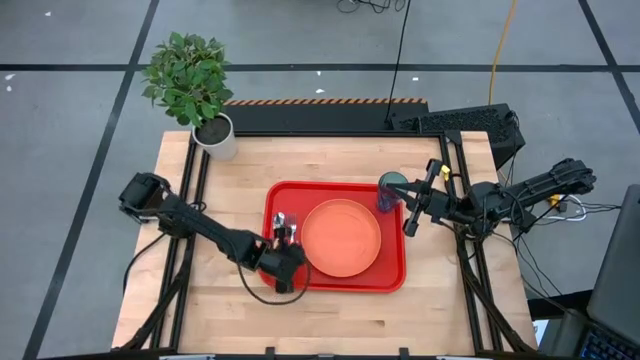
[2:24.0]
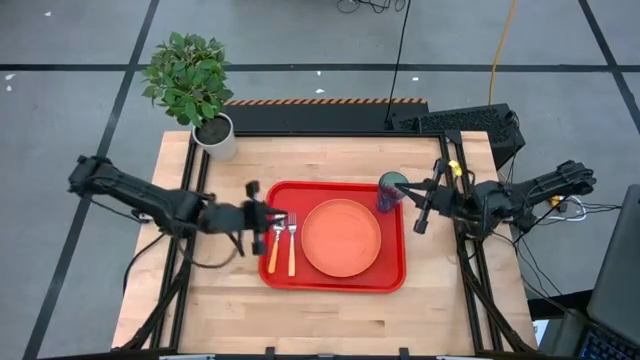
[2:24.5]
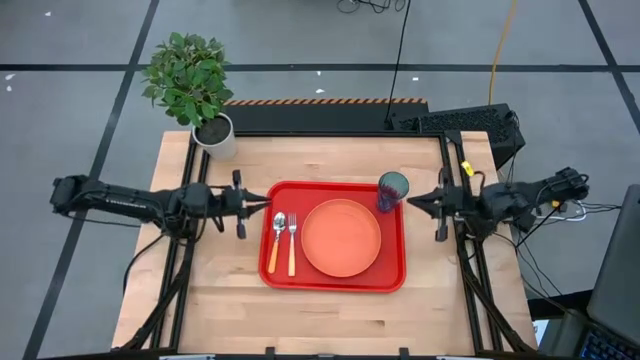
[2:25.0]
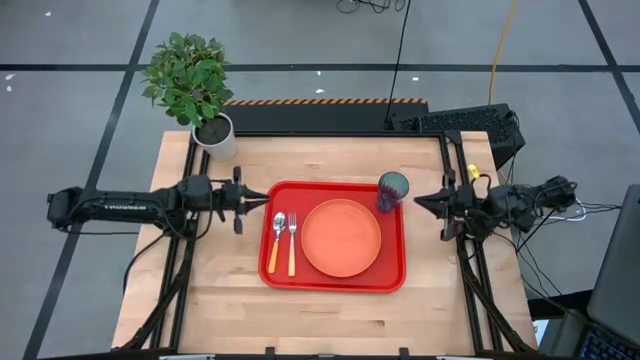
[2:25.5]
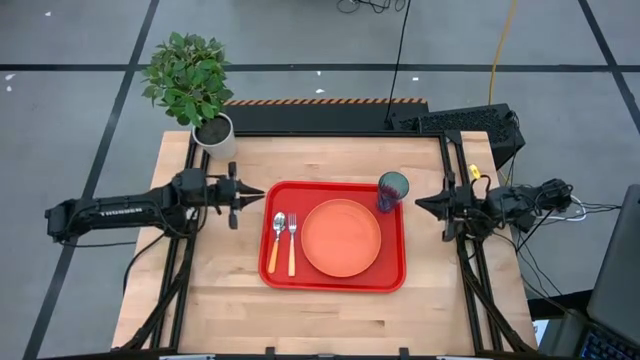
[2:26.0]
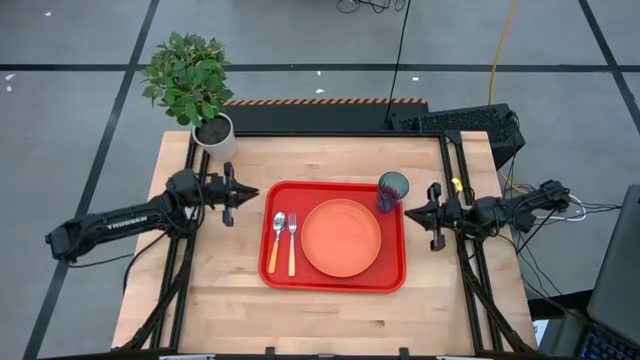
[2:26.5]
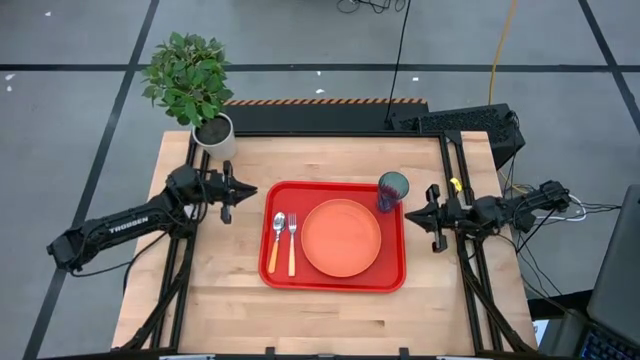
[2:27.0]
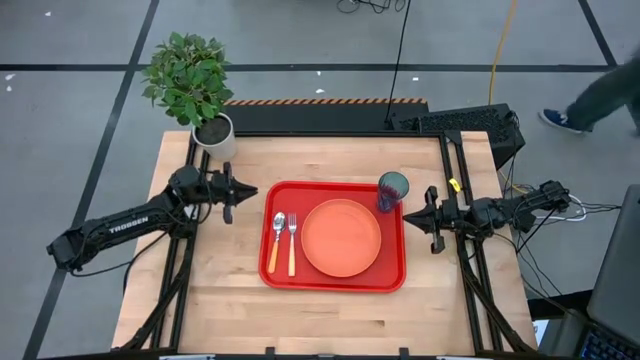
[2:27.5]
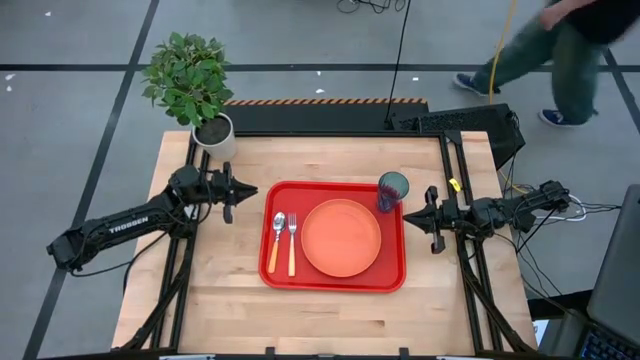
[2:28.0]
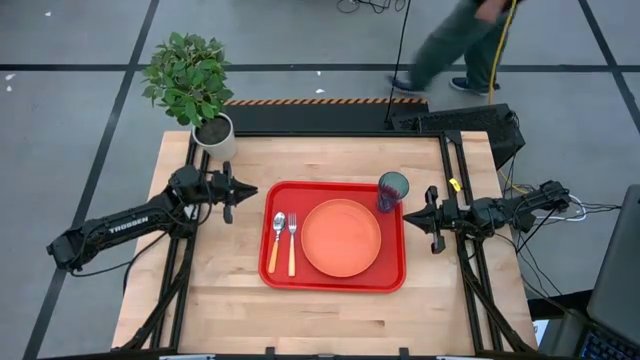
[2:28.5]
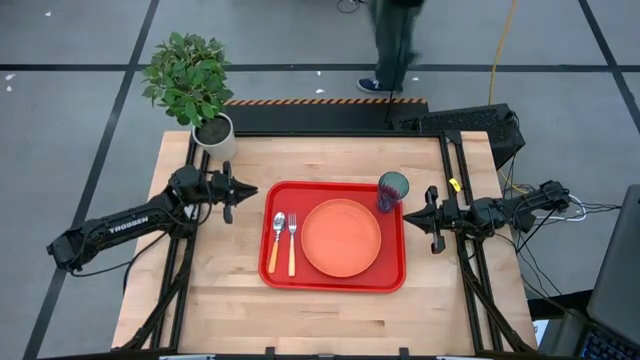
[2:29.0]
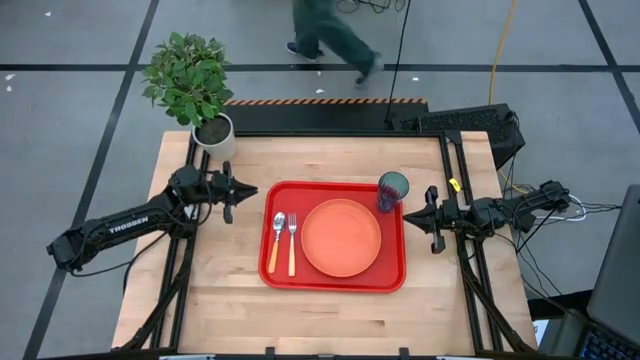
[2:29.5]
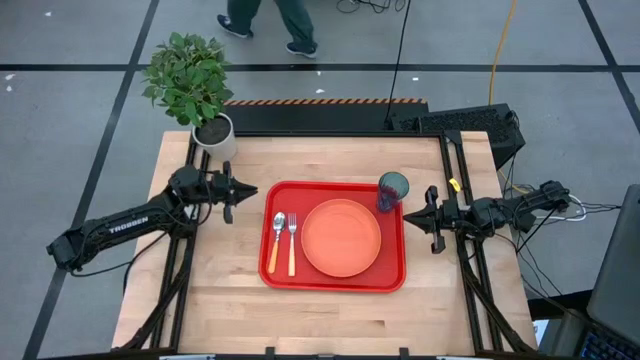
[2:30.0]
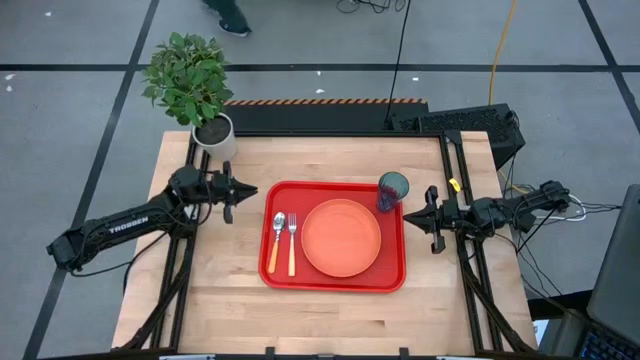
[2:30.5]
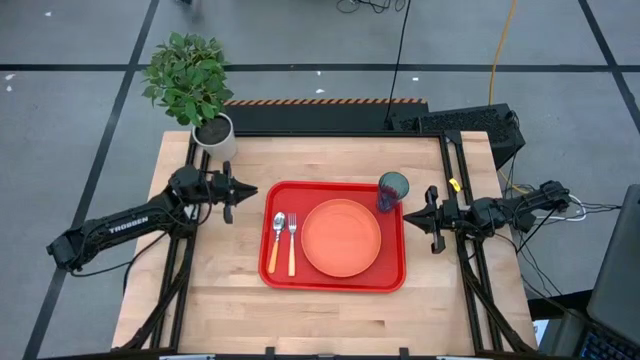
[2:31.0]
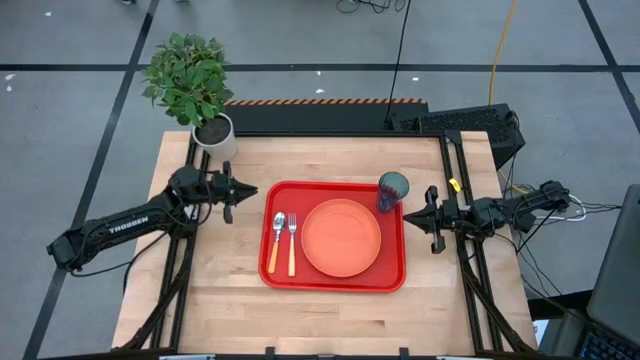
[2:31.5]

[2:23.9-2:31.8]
Task: Pick and place plate/cup/fork/spoon on tray
Return to Home Position

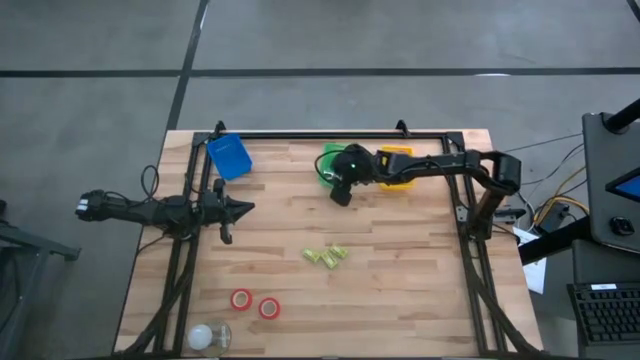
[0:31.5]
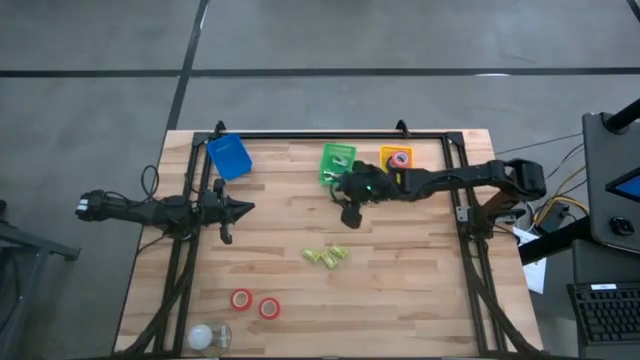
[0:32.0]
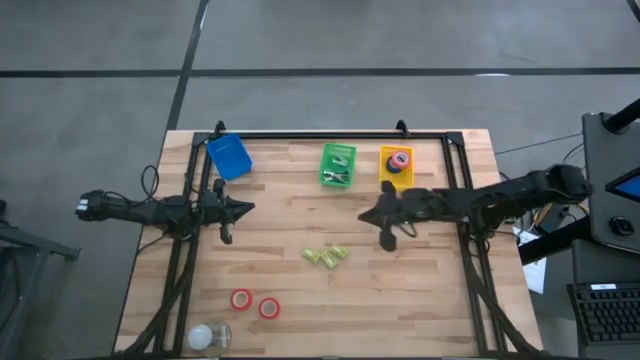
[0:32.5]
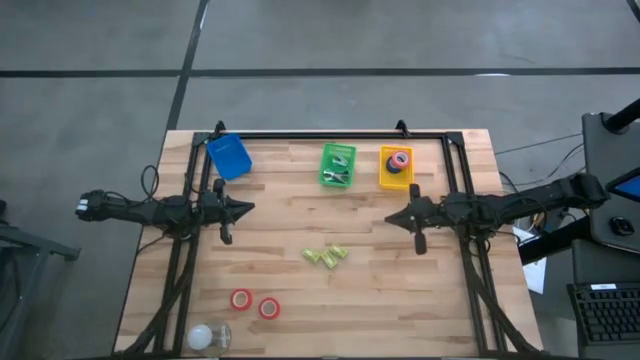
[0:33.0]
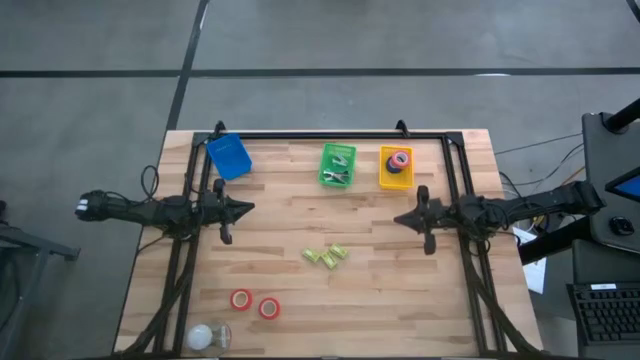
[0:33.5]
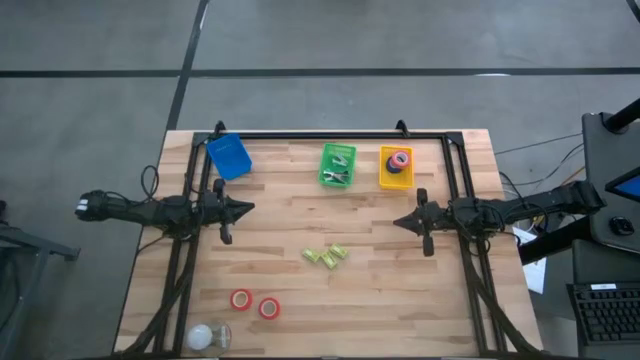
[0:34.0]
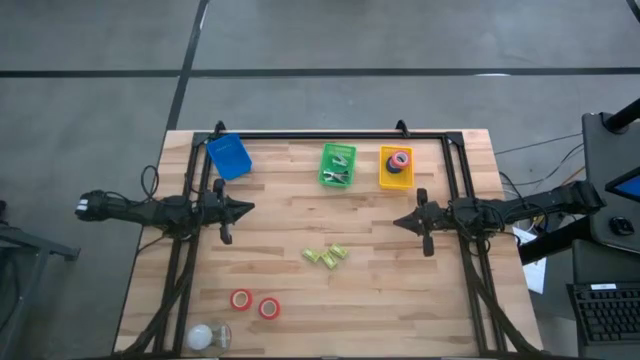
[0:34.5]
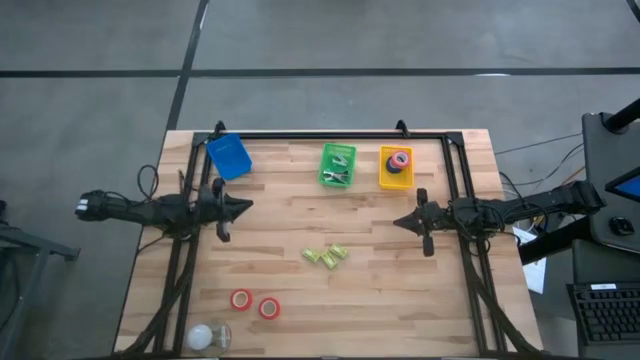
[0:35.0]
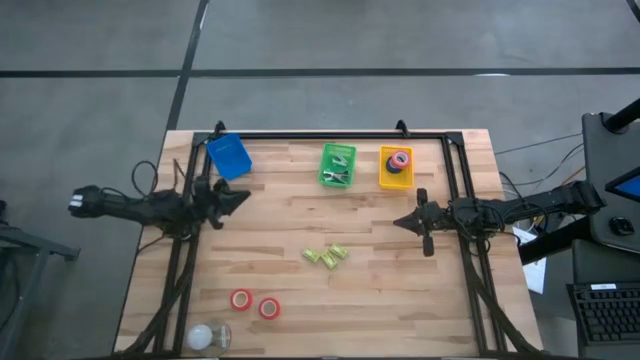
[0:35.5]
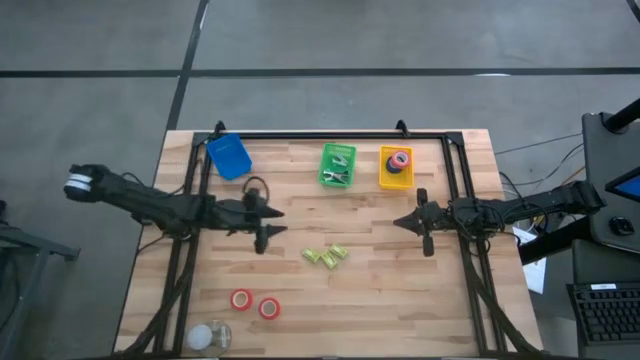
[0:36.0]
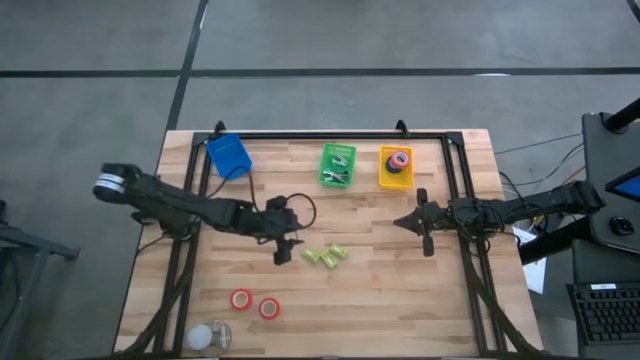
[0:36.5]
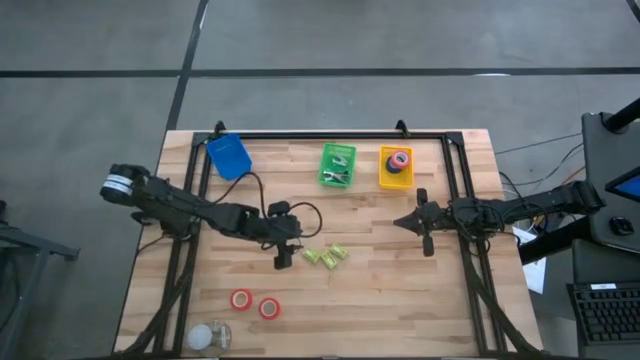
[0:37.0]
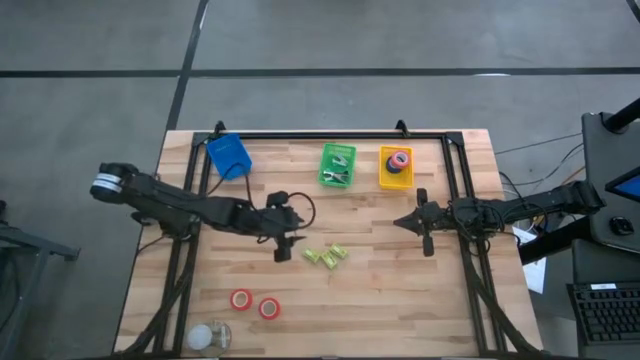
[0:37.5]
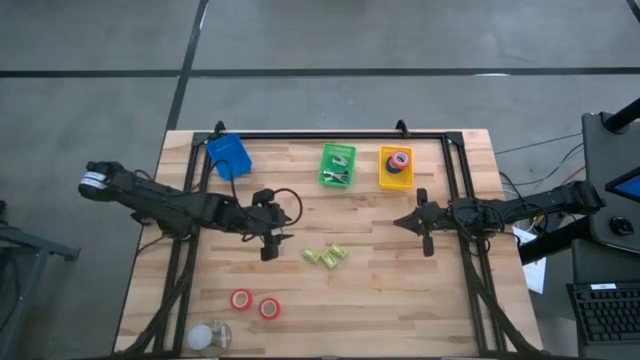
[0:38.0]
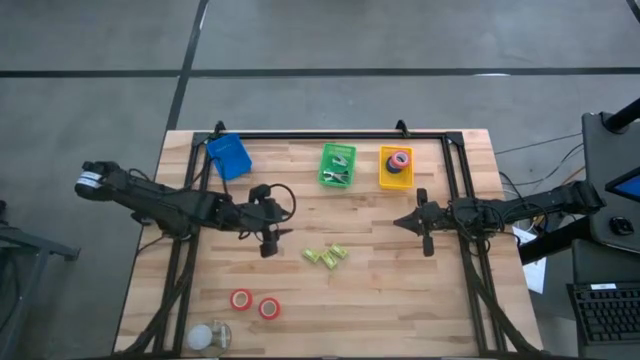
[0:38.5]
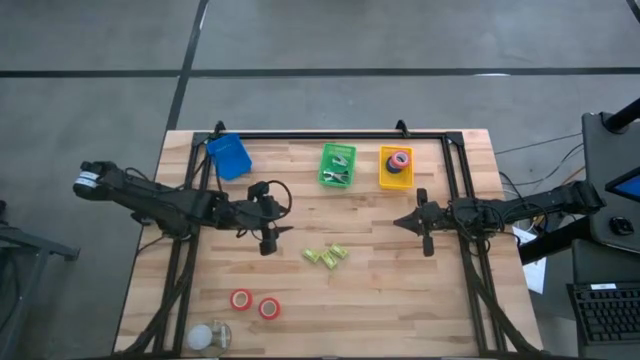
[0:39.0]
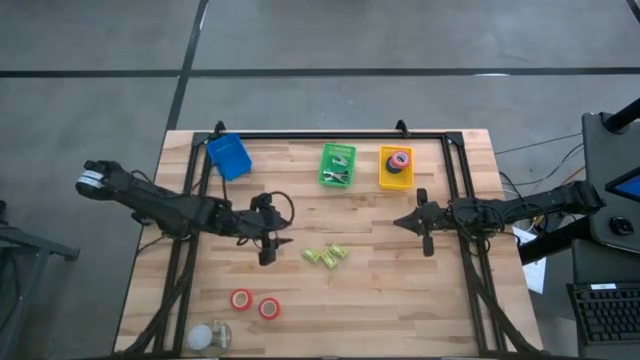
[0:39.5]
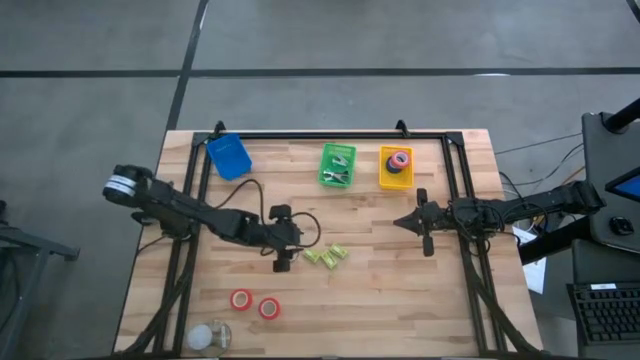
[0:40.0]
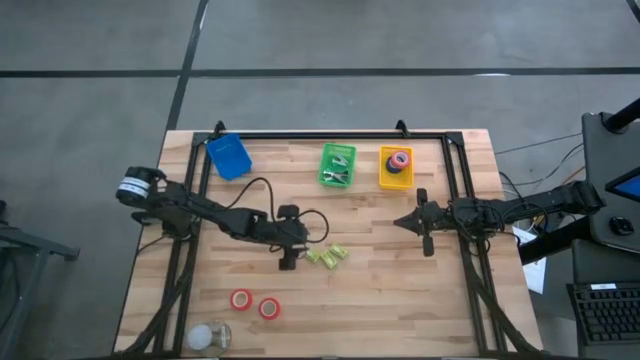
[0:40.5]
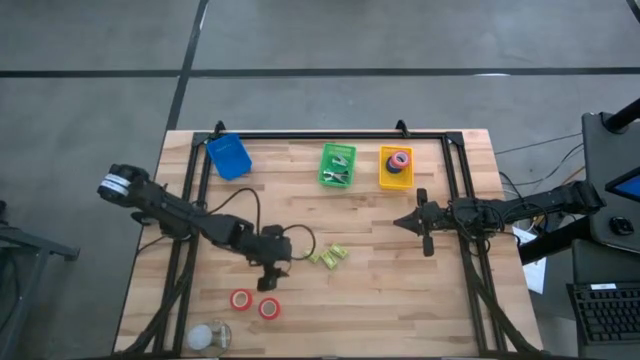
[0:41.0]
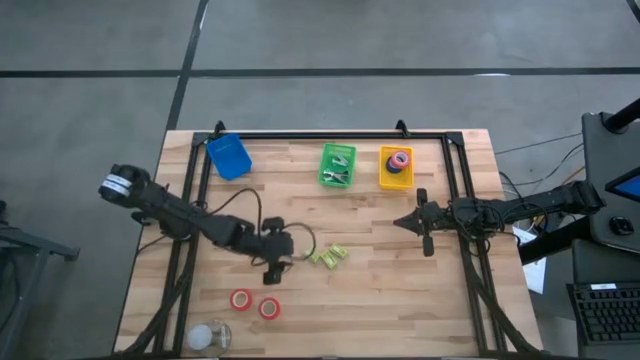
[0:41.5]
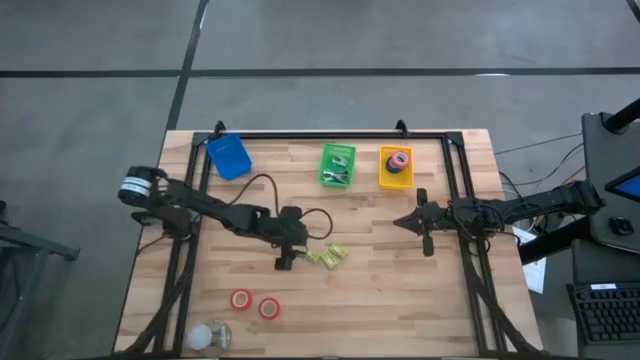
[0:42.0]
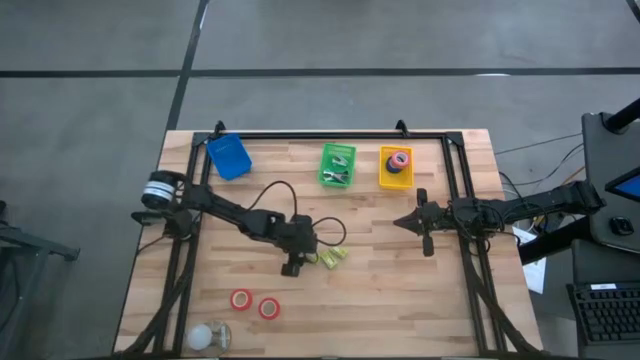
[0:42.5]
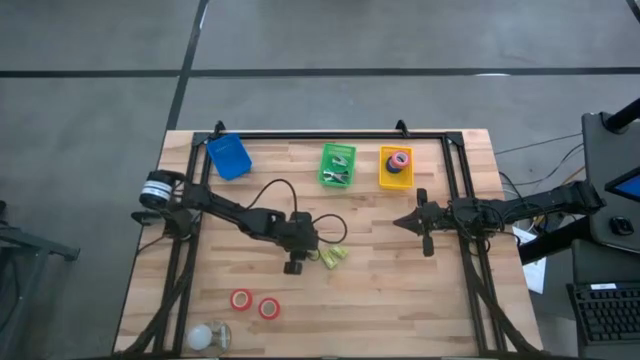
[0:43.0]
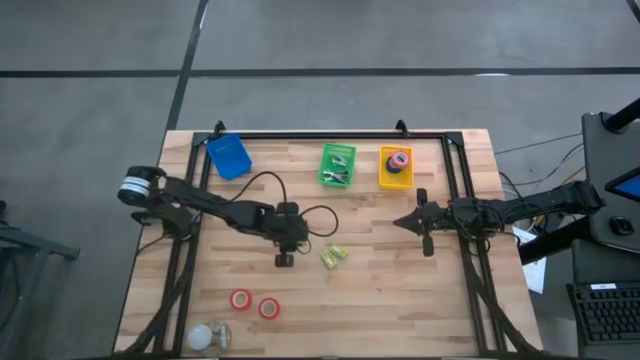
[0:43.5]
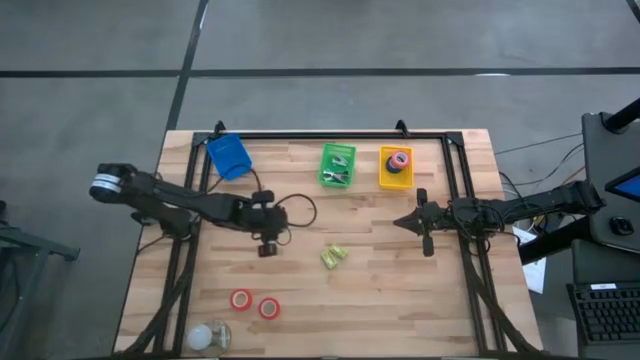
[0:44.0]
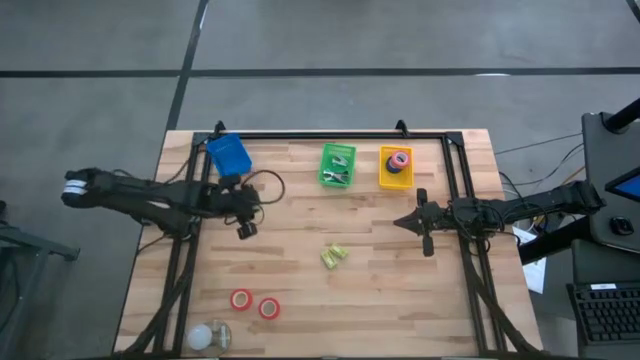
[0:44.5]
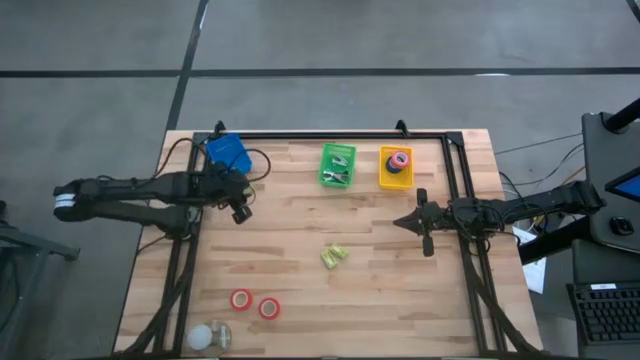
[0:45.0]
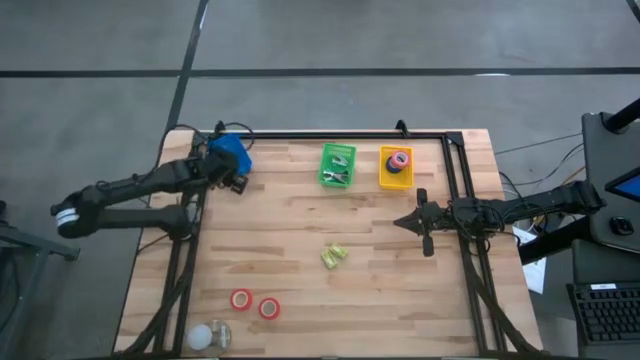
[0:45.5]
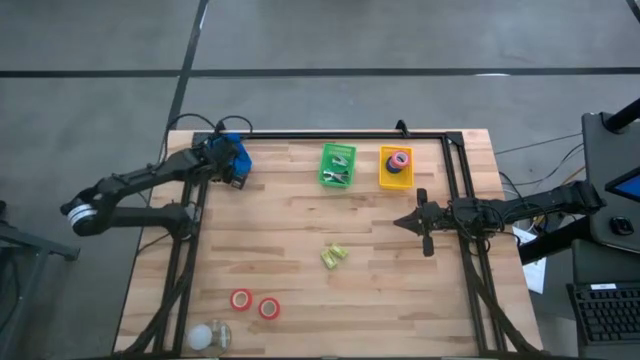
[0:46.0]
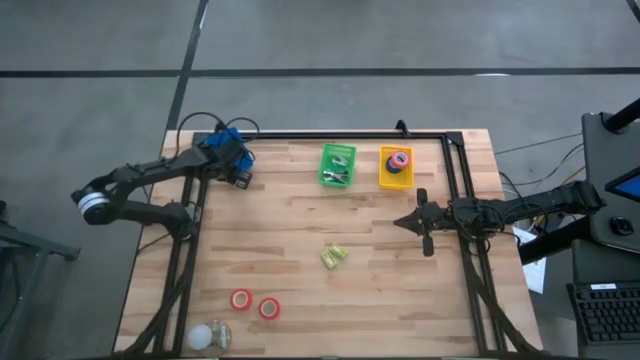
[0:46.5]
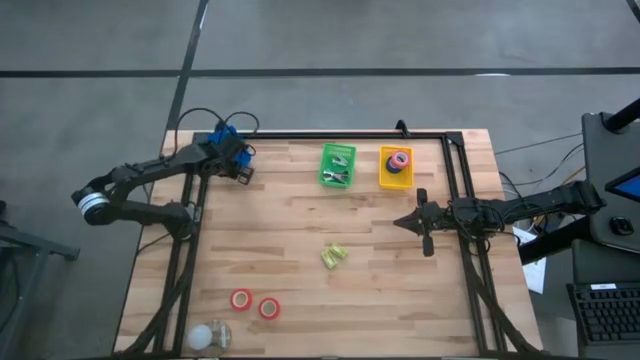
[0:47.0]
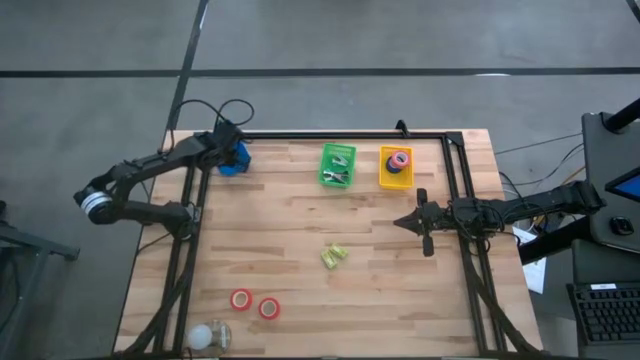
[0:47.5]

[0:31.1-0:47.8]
Task: Pick and place Stapler, Stapler remover, tape
Put the left green stapler pin box into the blue basket
